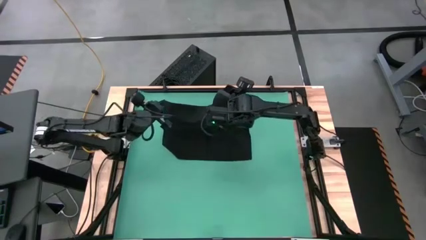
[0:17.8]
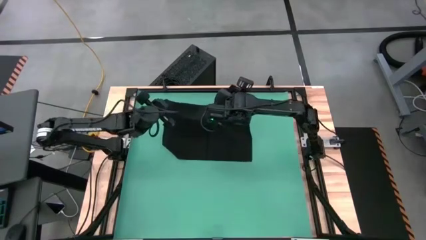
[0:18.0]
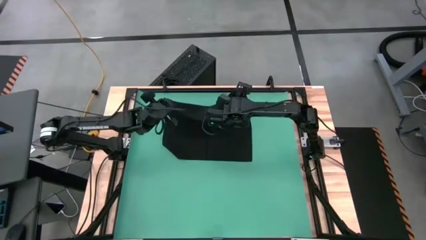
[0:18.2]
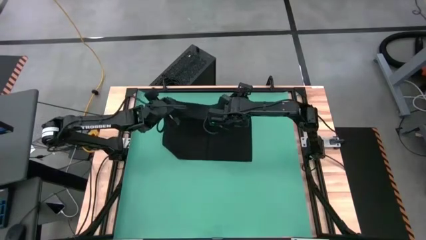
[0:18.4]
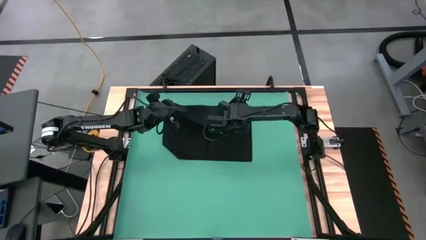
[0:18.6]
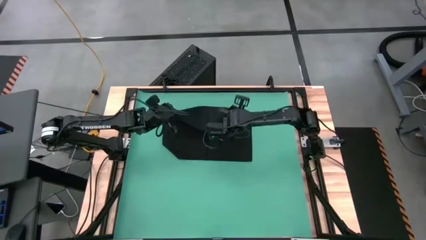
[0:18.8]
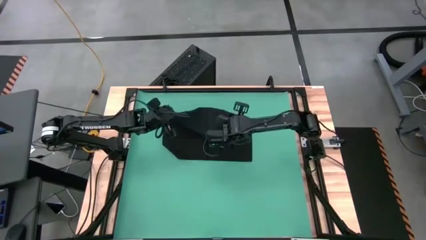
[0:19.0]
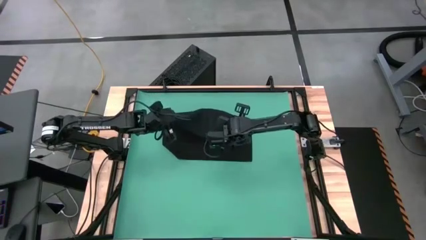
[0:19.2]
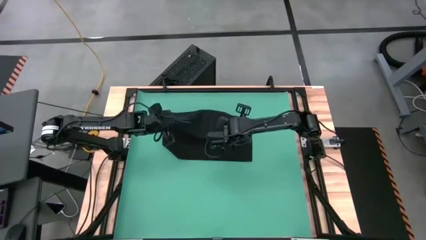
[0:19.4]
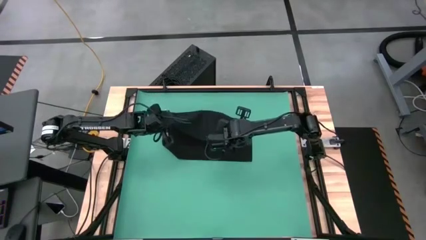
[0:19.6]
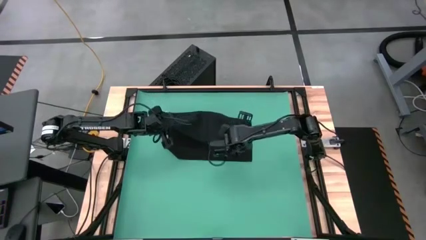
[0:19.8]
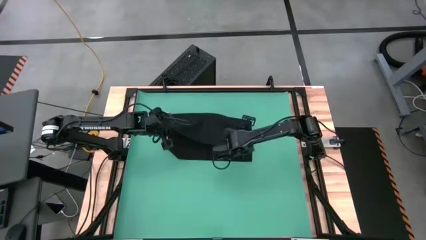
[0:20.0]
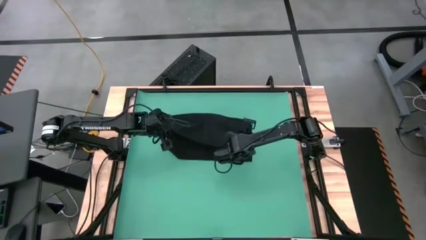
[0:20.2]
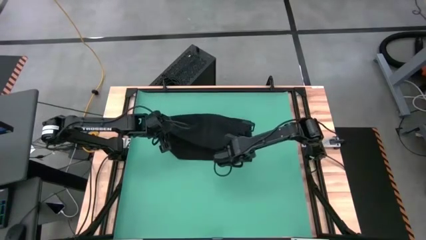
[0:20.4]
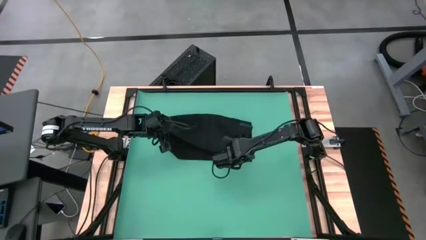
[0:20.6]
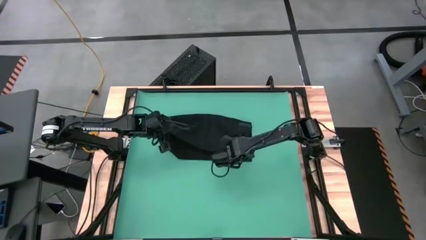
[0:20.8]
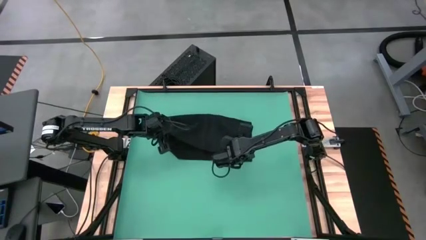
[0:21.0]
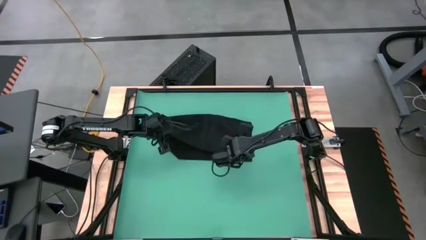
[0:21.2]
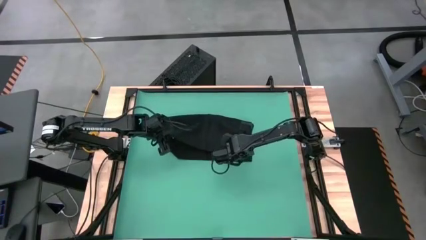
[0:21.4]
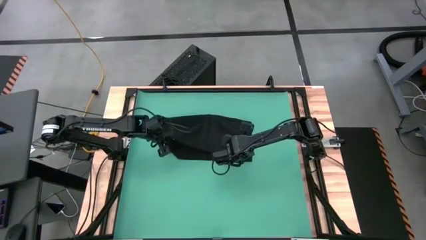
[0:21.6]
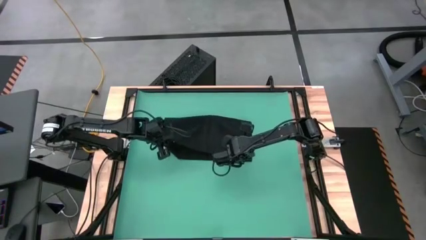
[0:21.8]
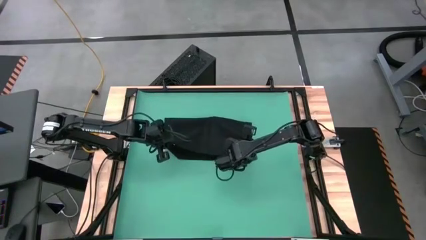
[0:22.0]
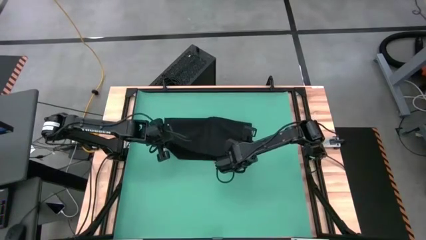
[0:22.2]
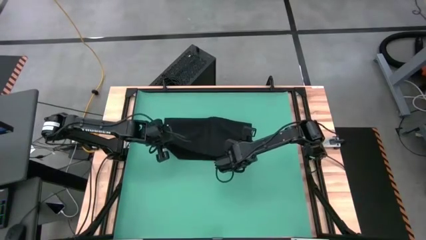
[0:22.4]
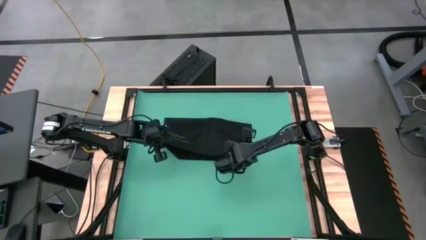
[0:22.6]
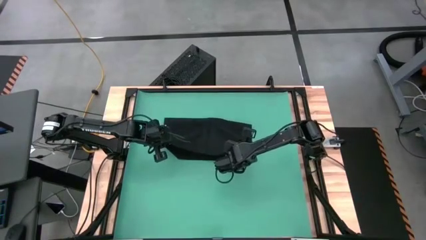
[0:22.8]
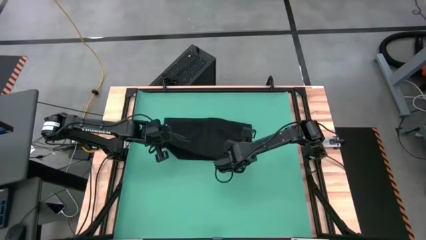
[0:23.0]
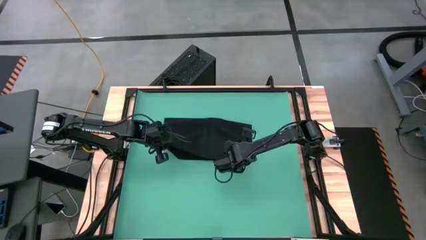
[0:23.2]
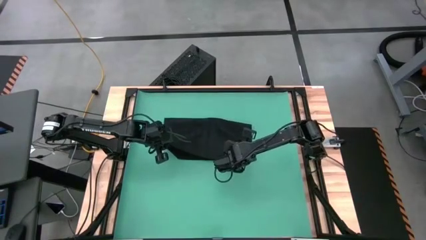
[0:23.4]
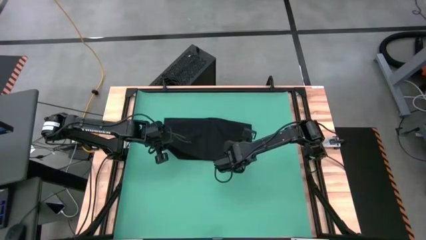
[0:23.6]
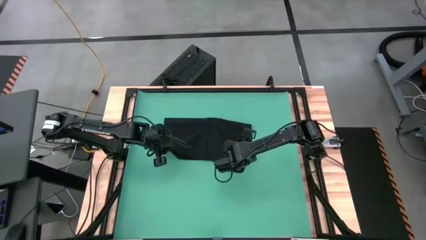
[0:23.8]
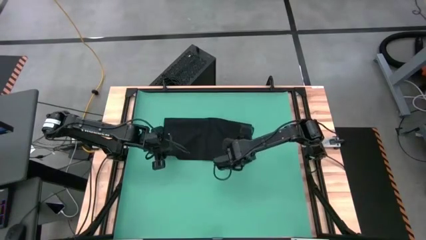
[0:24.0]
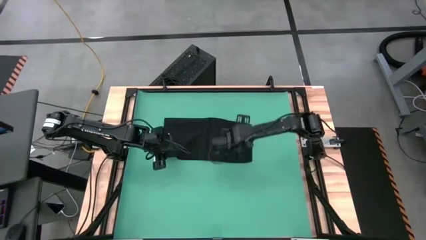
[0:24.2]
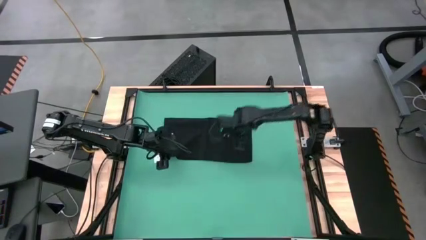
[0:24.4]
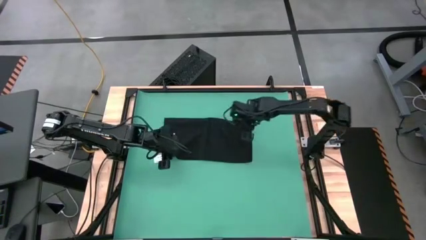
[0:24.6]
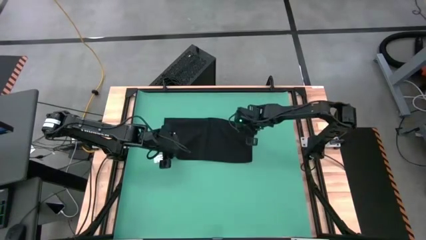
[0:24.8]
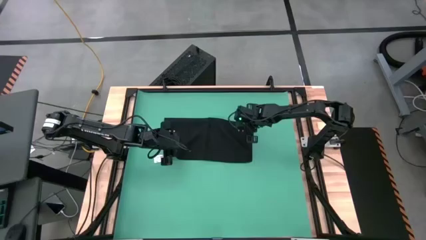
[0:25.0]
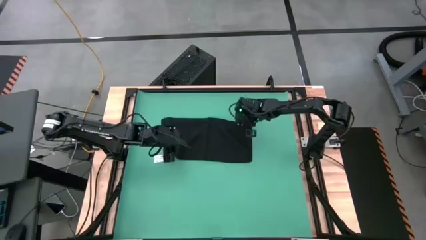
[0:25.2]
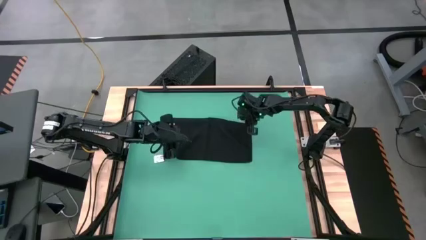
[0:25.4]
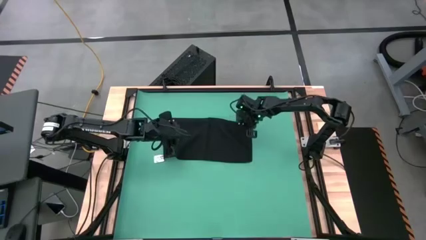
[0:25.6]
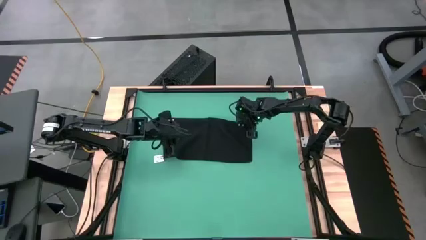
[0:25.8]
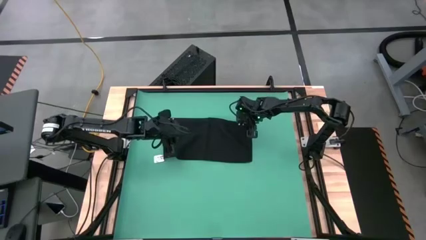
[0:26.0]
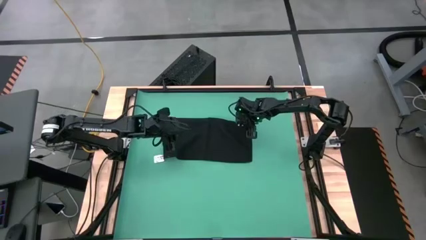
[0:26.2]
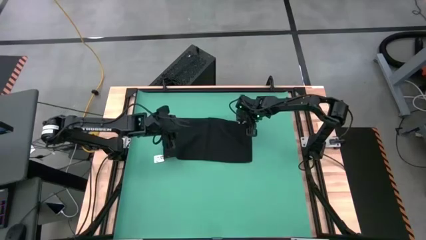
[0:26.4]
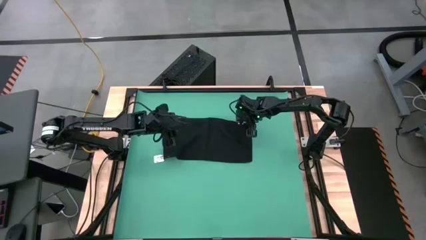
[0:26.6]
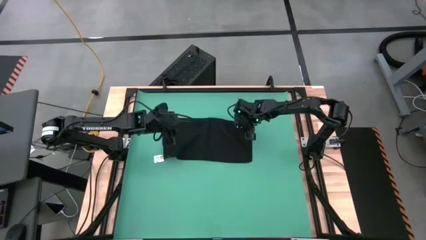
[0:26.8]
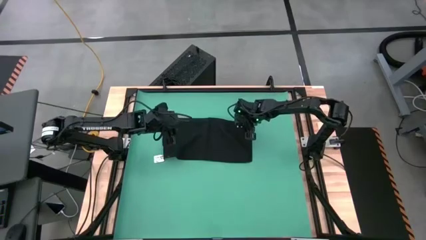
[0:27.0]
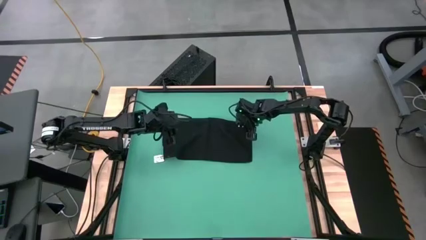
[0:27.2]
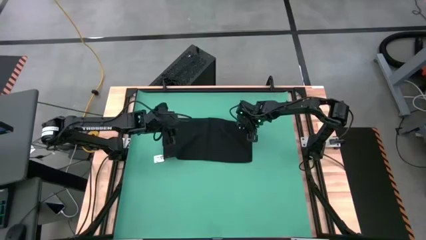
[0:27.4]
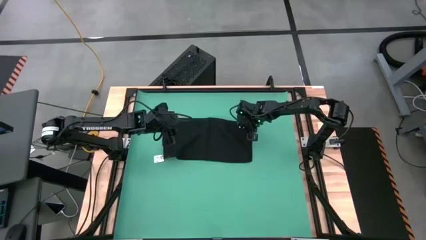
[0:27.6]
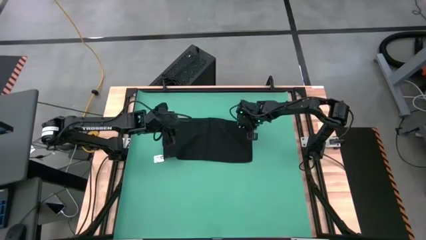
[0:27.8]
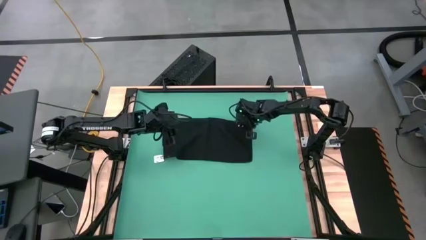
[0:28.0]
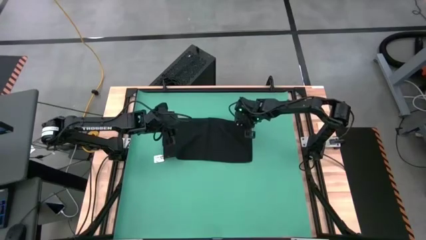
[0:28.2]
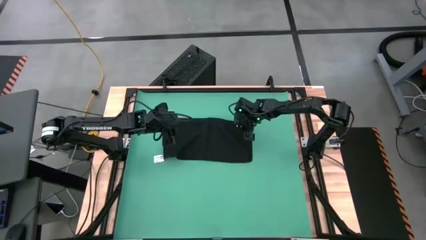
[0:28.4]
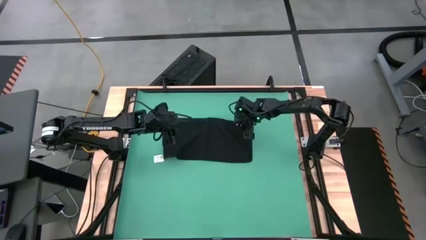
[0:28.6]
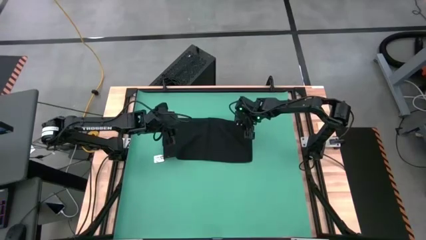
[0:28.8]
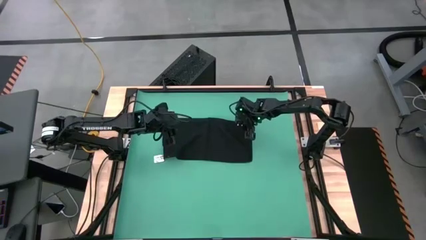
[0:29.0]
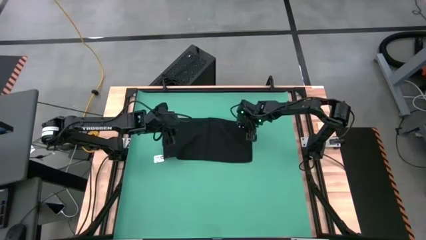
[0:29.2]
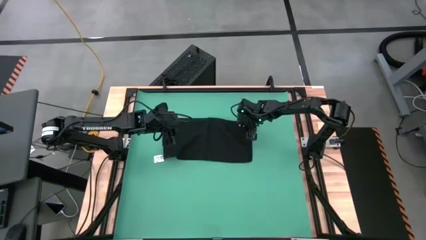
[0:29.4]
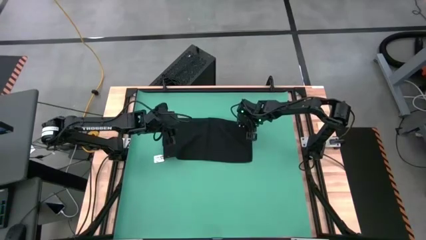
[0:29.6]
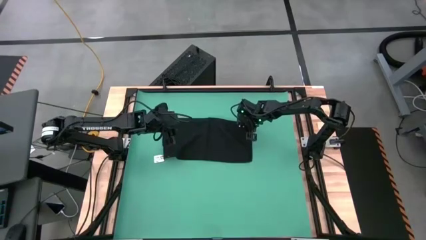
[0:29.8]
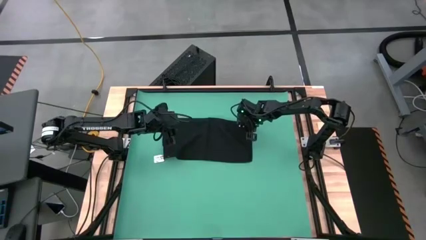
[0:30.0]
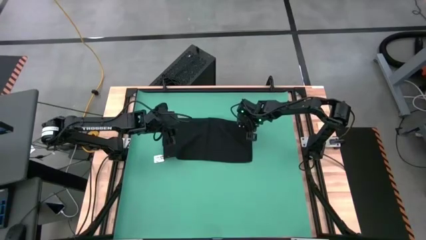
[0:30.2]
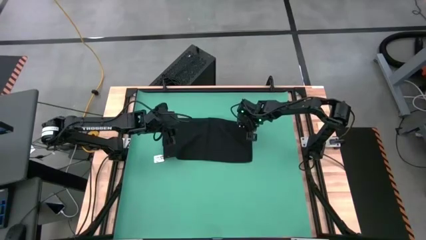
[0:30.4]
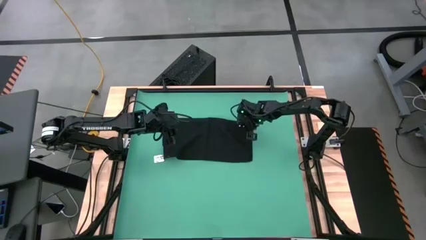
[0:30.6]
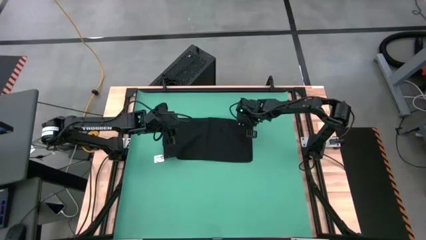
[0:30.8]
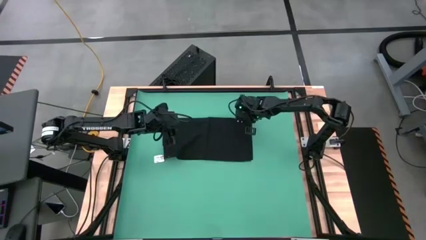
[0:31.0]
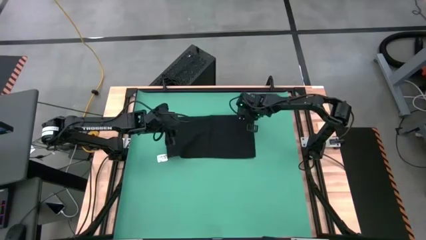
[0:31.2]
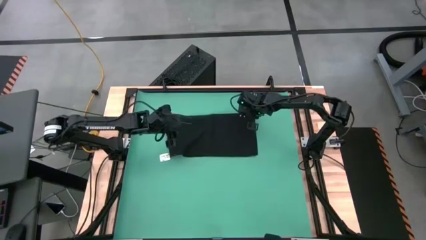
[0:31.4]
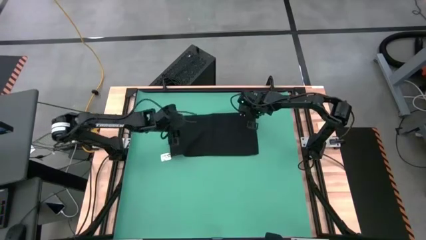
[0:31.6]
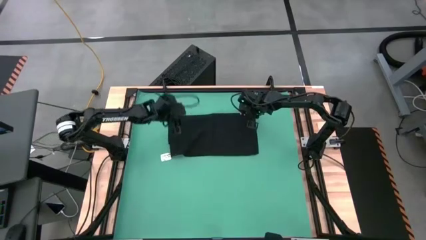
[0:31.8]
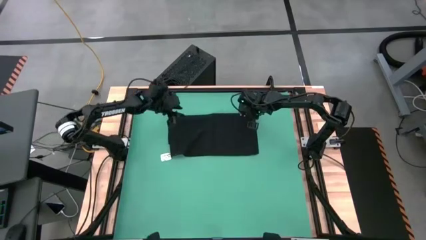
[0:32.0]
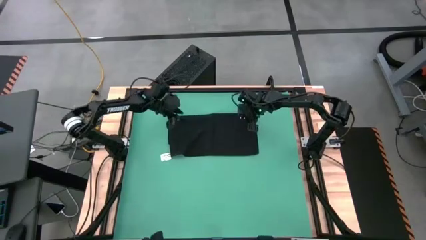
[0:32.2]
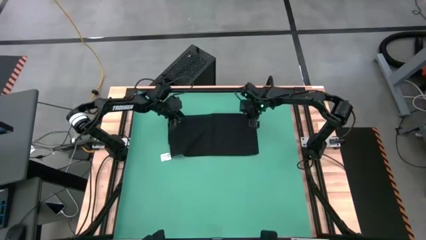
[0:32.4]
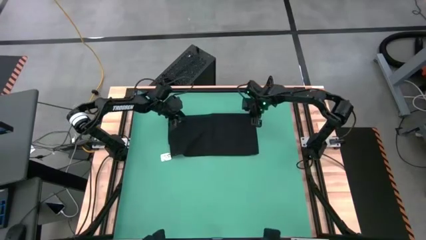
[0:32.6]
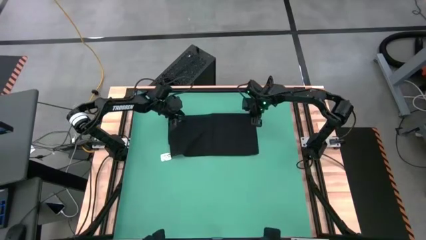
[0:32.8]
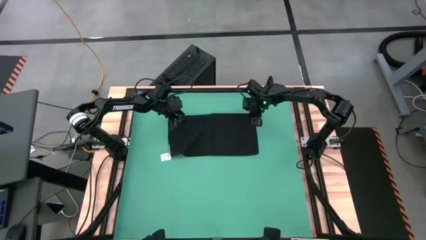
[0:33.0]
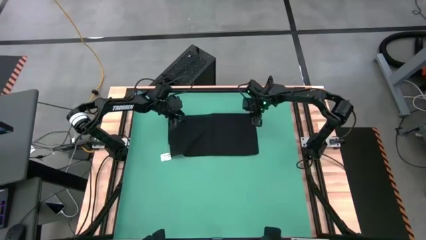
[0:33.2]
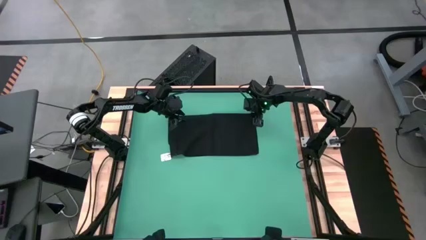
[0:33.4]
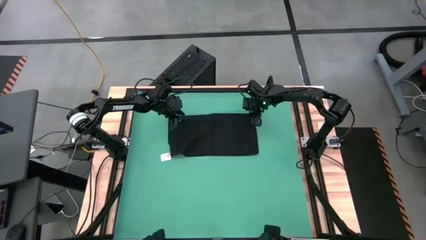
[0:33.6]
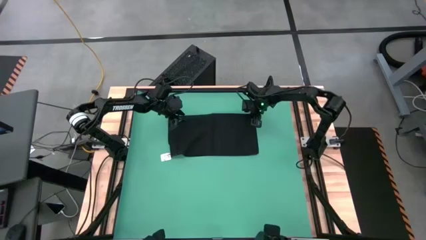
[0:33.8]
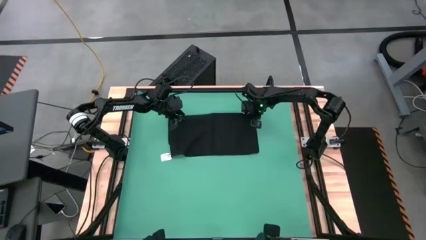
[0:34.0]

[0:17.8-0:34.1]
Task: Roll towel into tight, uniform cylinder
Fold the towel
